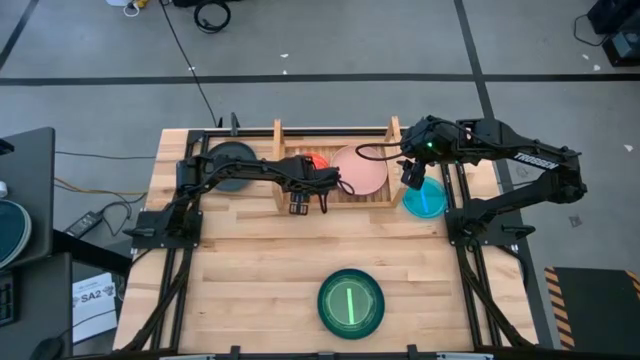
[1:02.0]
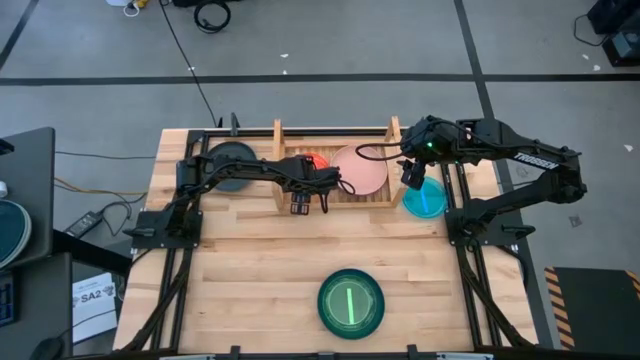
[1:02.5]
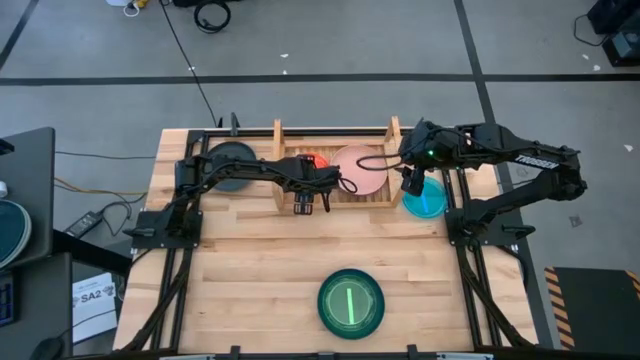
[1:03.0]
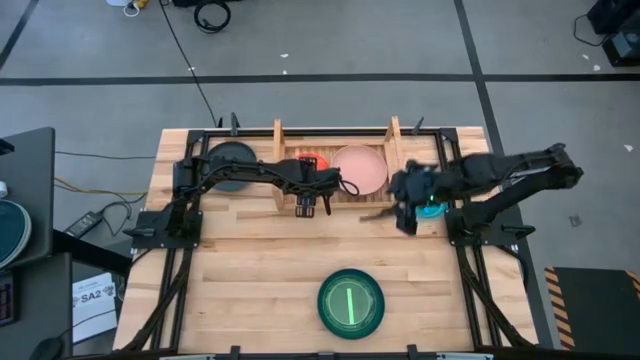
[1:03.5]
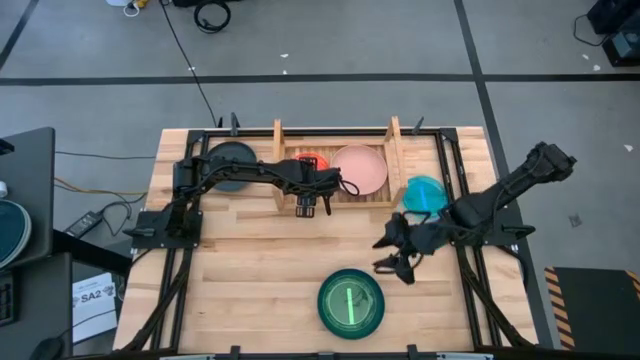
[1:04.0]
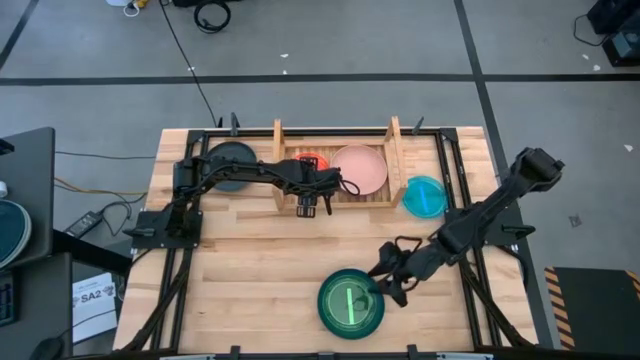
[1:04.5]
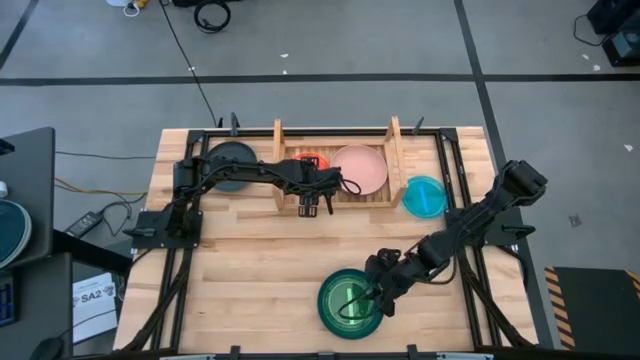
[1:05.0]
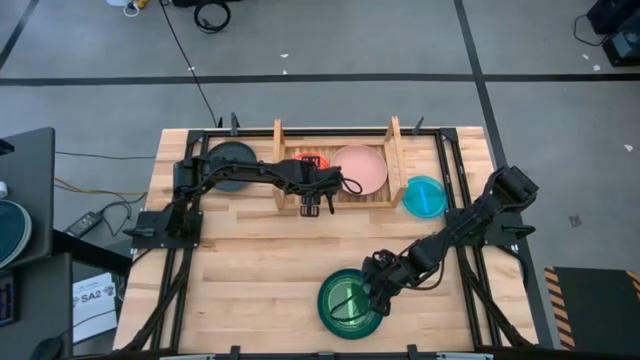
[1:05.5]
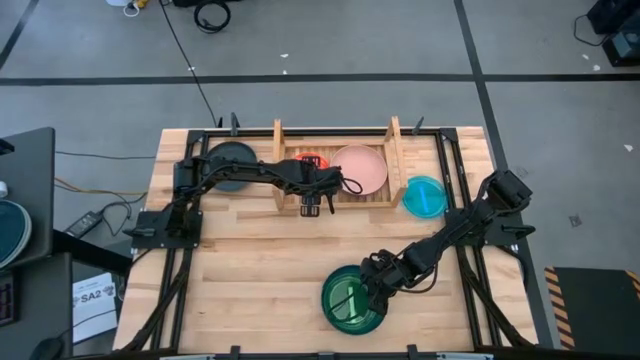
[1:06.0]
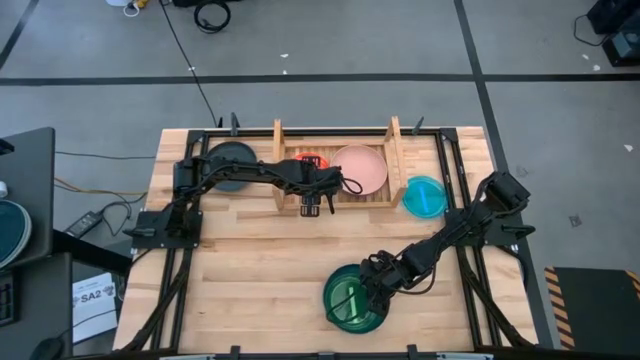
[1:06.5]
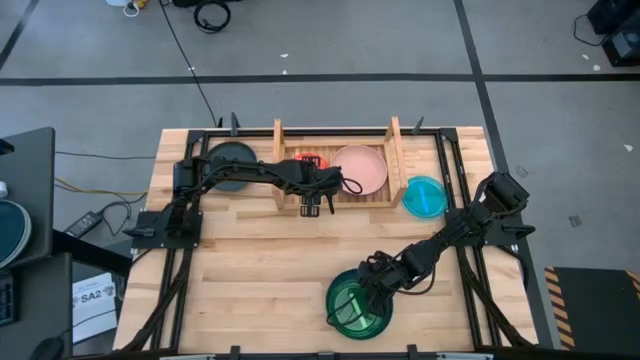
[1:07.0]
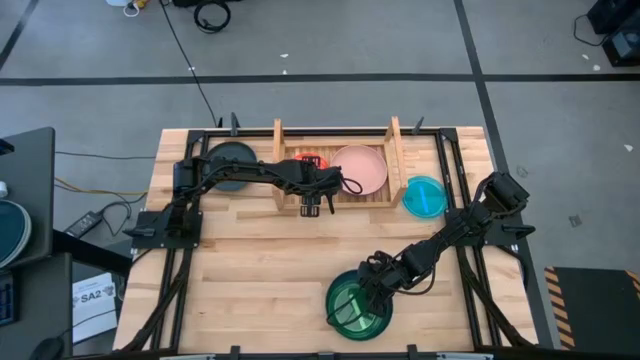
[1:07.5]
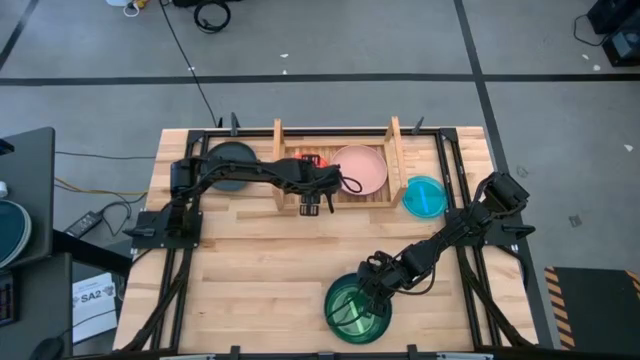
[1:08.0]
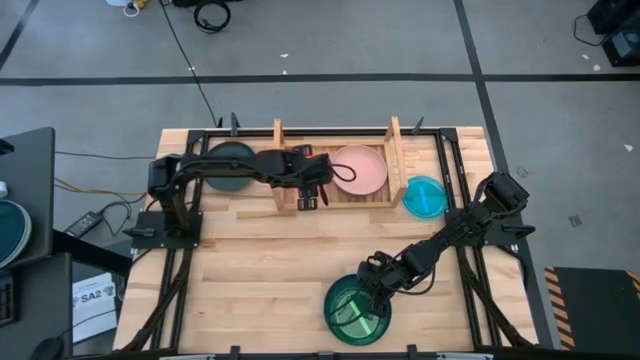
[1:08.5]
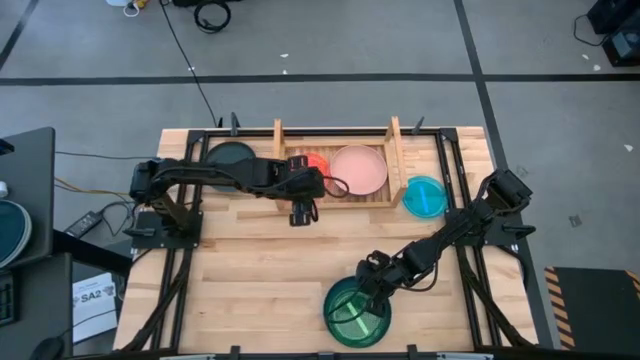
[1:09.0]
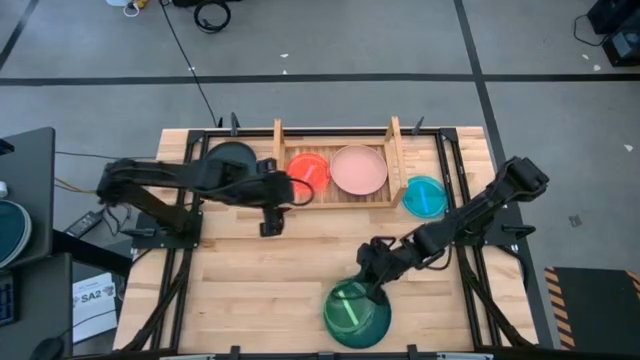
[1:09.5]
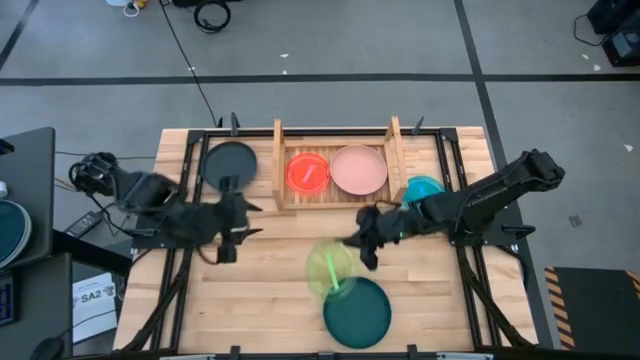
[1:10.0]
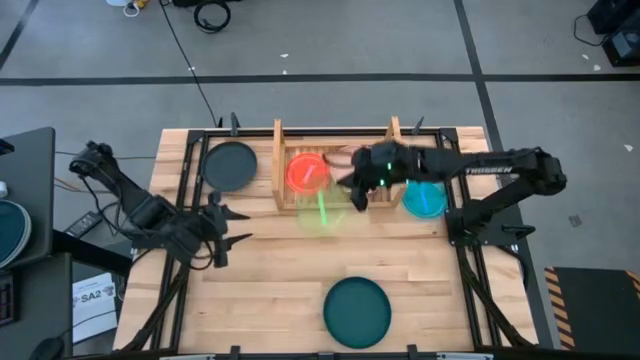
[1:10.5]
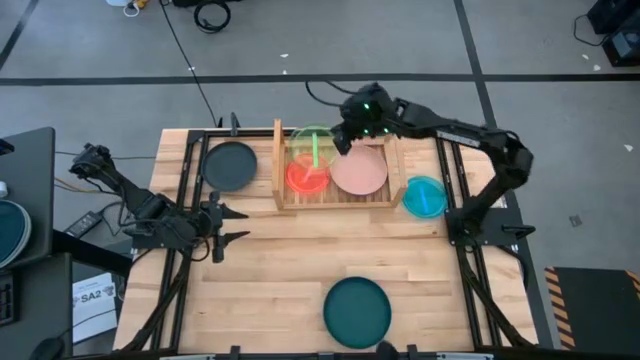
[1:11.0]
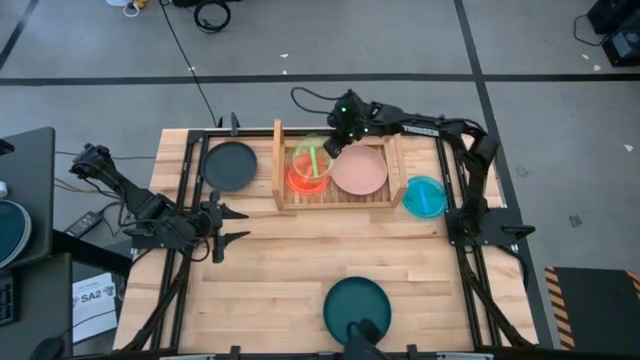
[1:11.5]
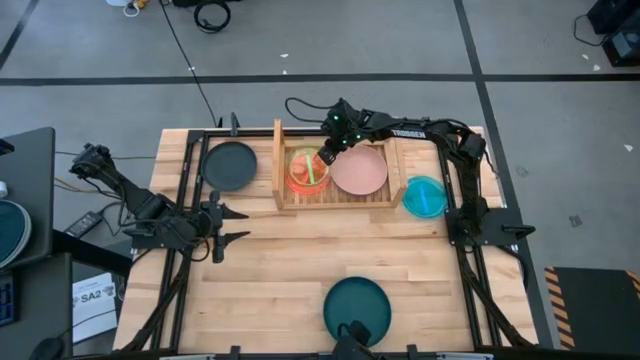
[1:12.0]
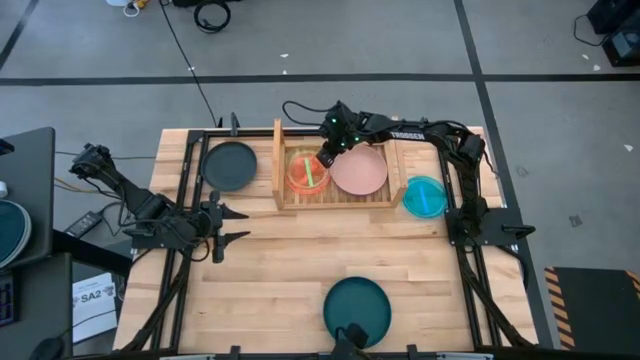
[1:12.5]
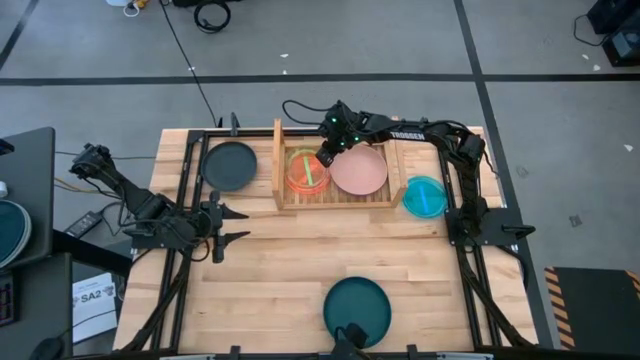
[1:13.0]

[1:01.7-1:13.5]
Task: Place and stack plates onto a shelf
Stack the small green plate on top of the small pink plate on the shelf

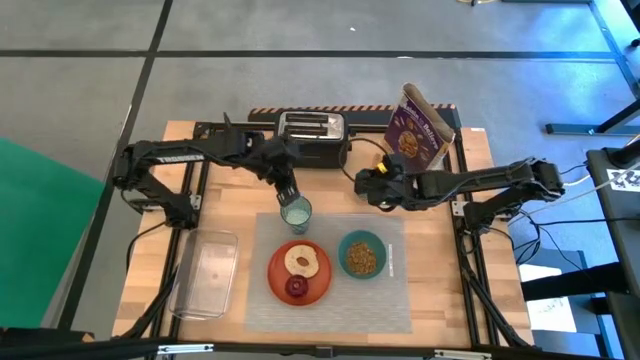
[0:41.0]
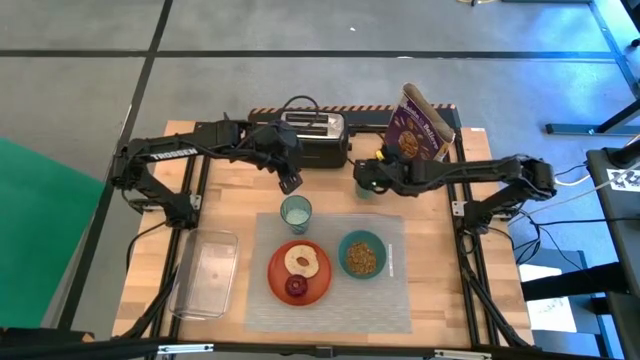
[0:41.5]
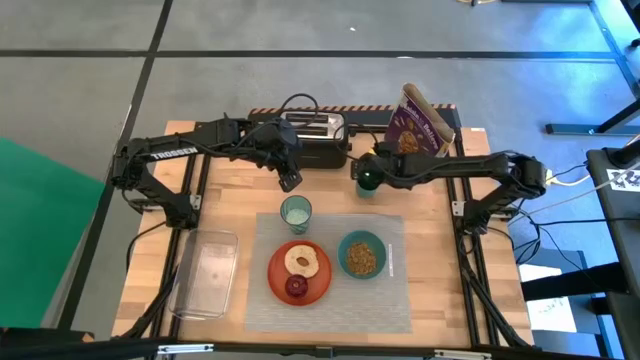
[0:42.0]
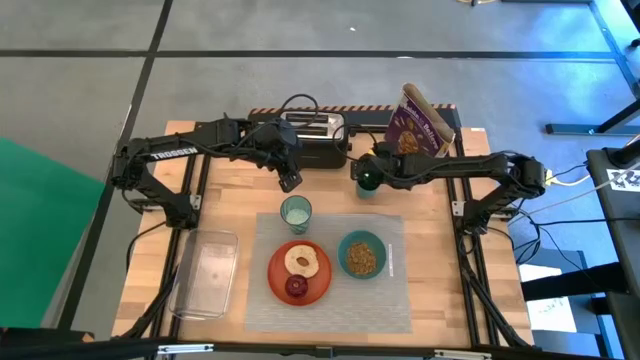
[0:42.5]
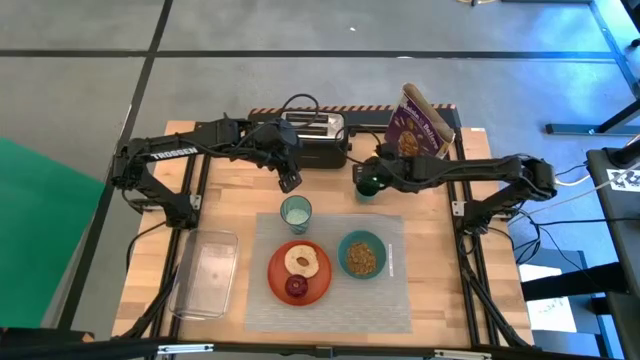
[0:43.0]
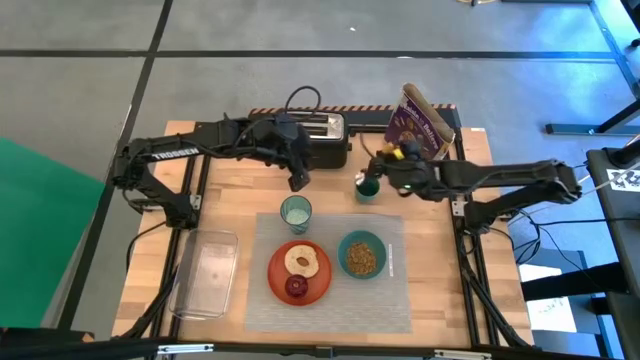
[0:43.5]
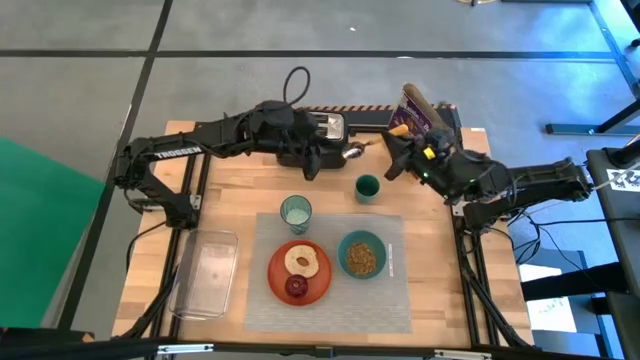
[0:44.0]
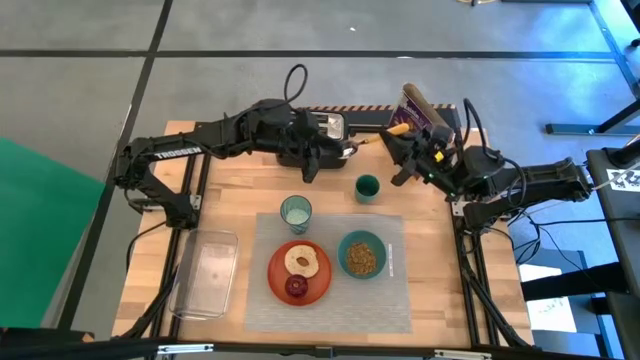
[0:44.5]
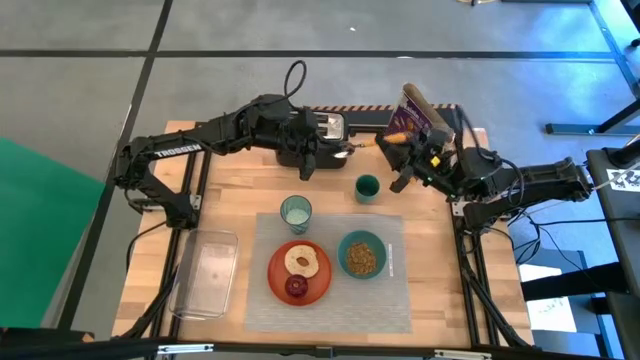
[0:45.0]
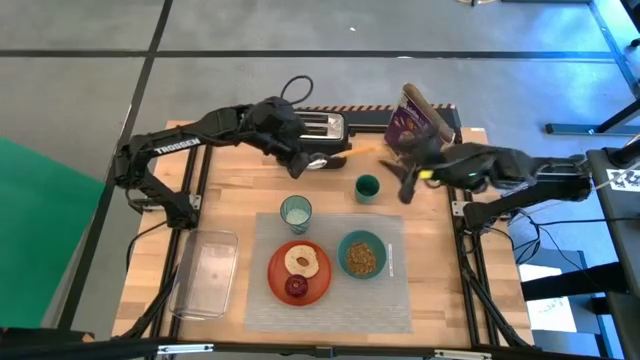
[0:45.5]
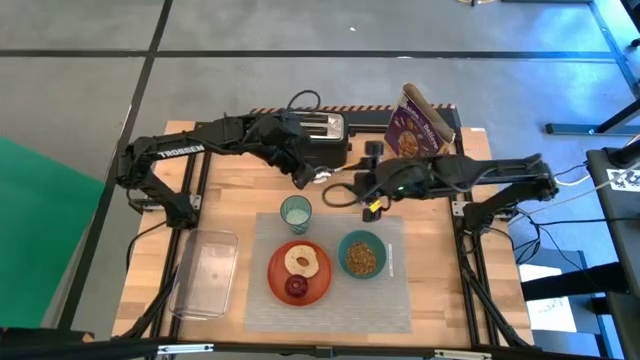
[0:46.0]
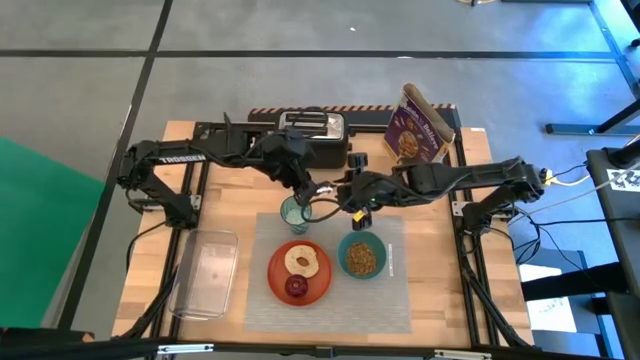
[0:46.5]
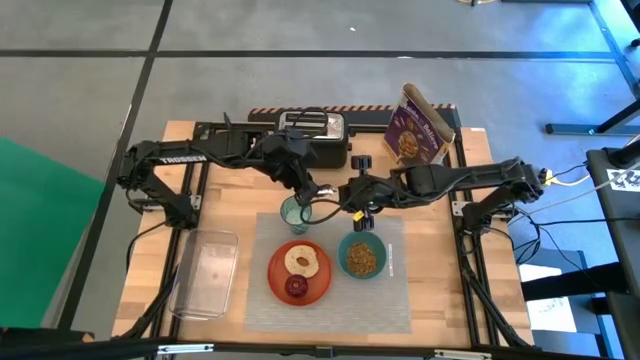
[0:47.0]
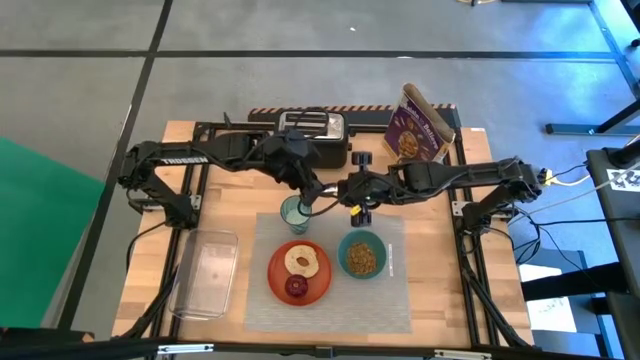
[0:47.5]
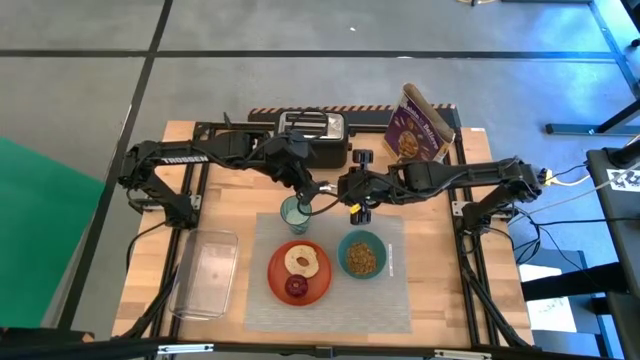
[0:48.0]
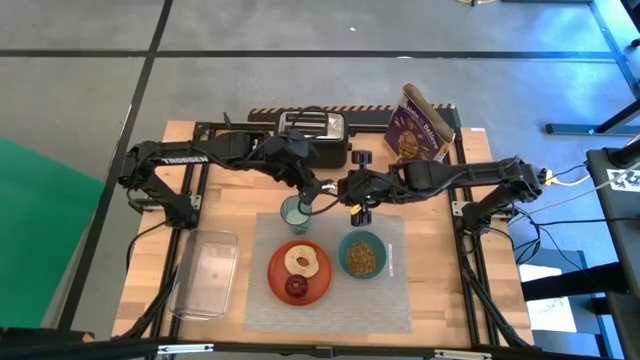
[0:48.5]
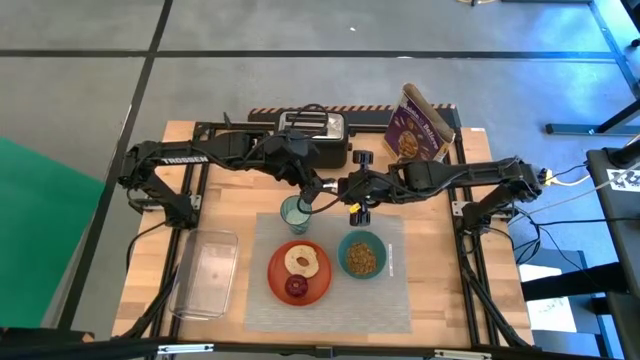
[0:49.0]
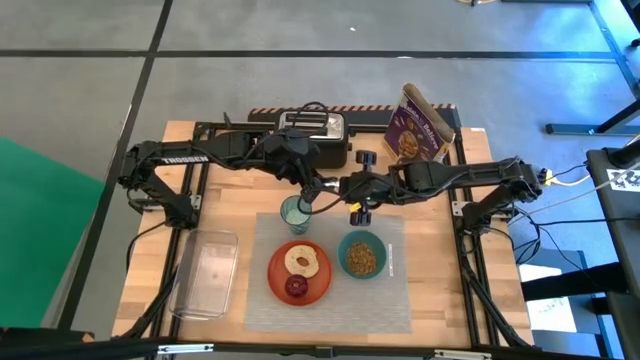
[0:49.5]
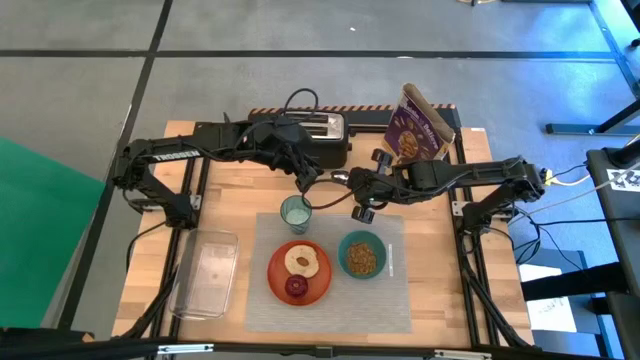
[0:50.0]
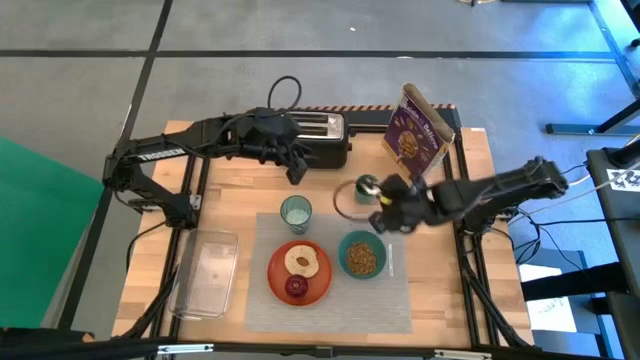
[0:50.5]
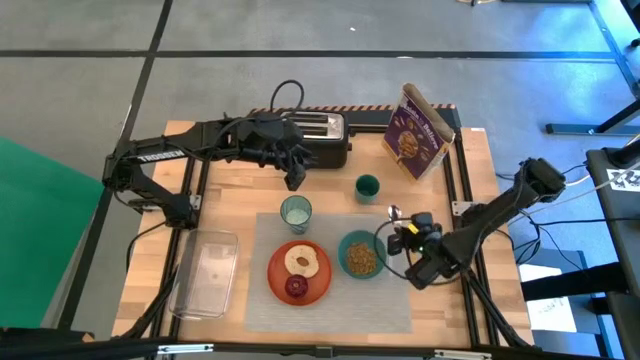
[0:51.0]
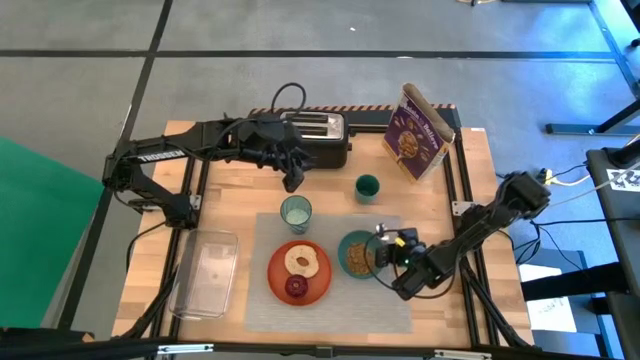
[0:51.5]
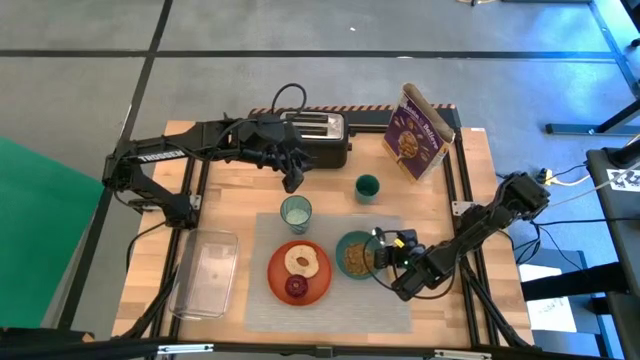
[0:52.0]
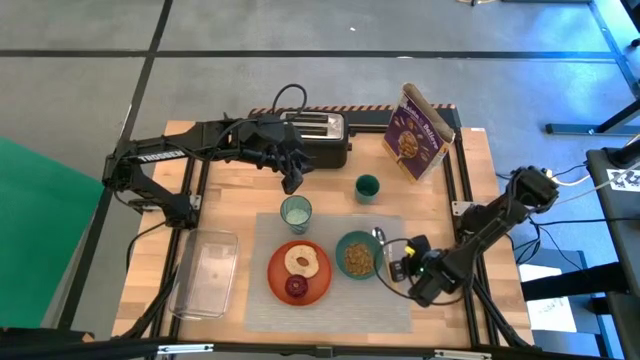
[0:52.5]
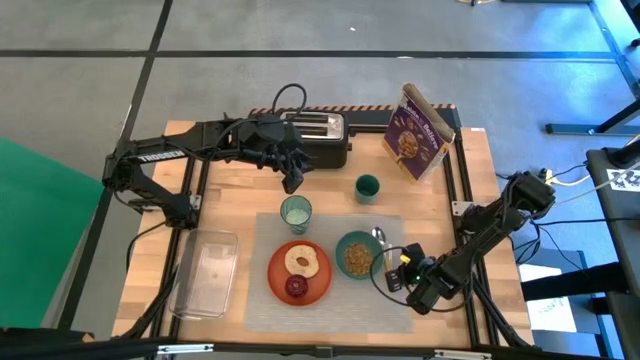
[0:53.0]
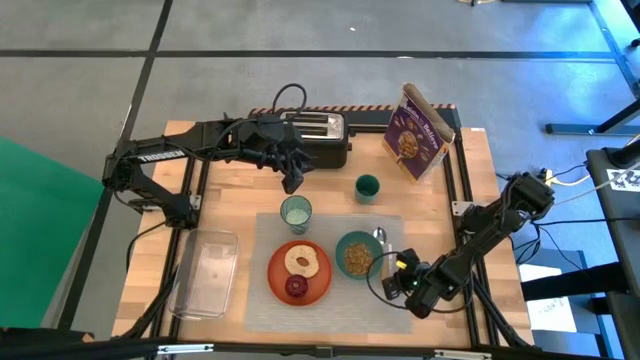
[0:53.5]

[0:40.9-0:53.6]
Task: Arrange a breakfast setting
Put the yellow spoon to the right of the green bowl on the gray table mat
